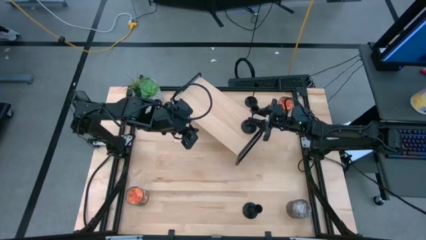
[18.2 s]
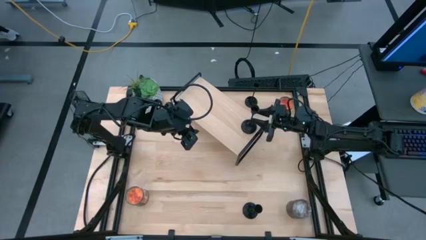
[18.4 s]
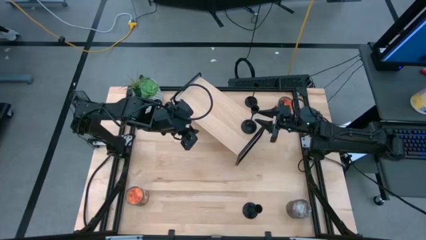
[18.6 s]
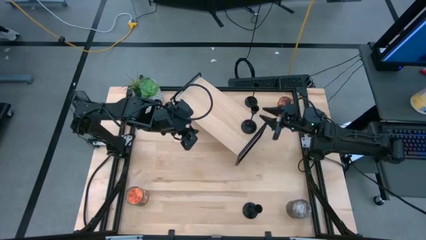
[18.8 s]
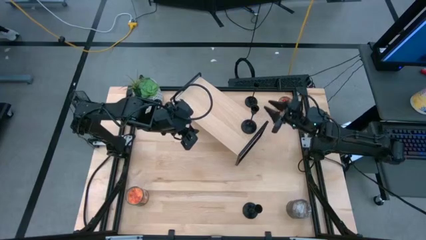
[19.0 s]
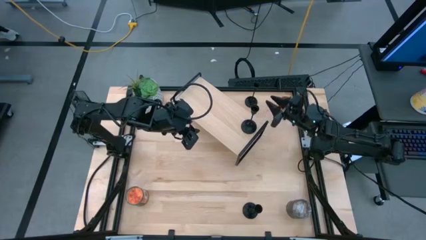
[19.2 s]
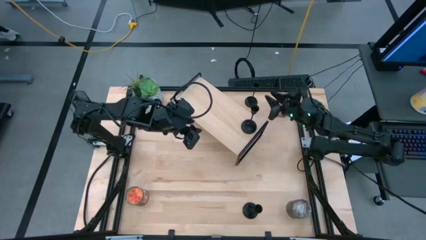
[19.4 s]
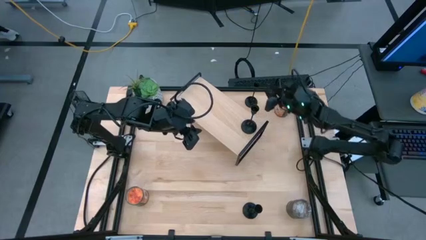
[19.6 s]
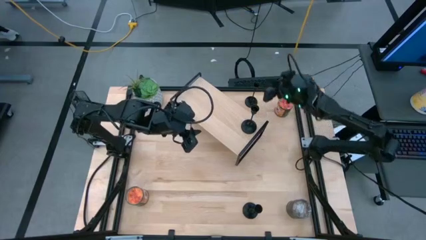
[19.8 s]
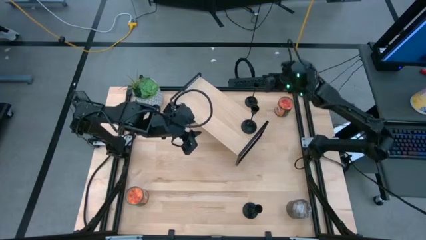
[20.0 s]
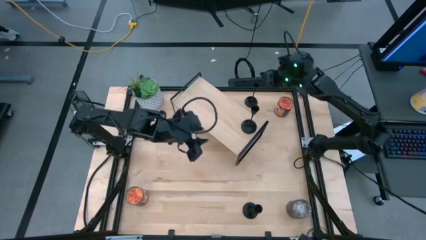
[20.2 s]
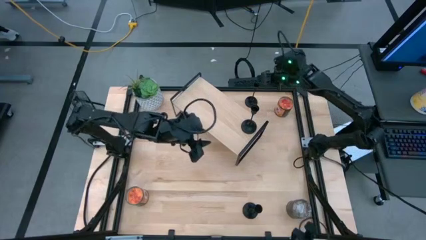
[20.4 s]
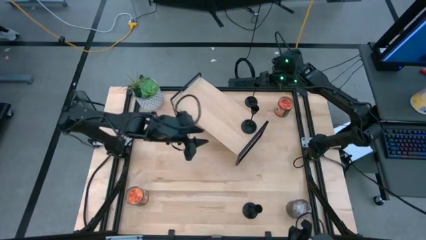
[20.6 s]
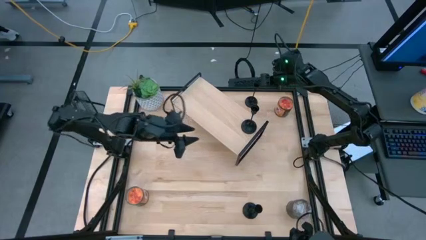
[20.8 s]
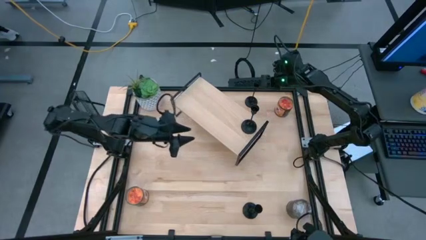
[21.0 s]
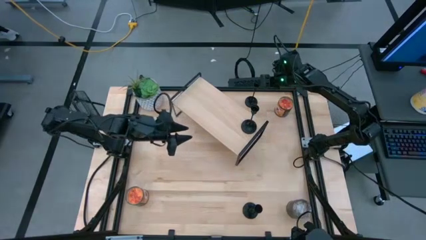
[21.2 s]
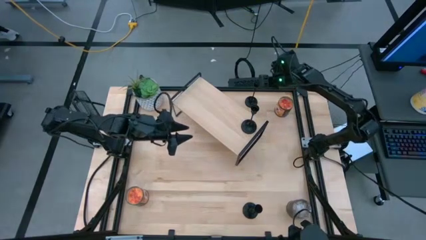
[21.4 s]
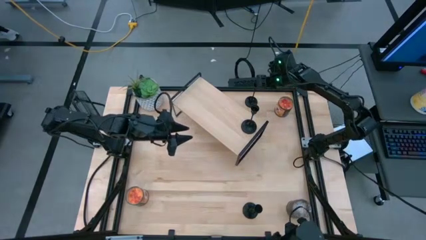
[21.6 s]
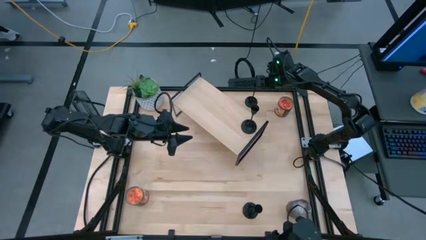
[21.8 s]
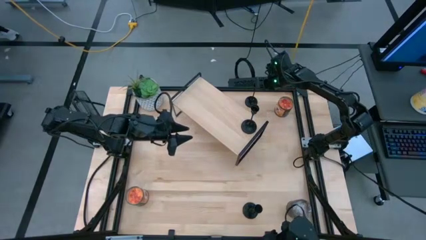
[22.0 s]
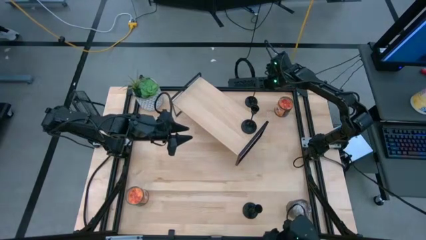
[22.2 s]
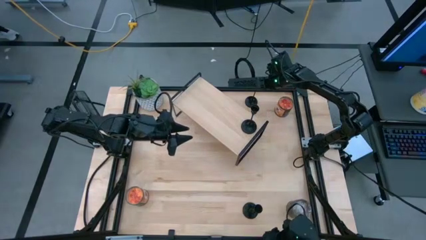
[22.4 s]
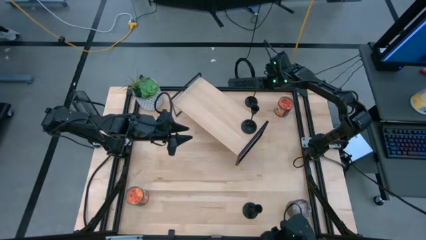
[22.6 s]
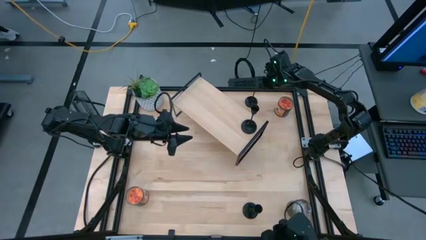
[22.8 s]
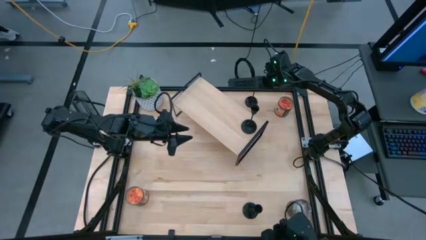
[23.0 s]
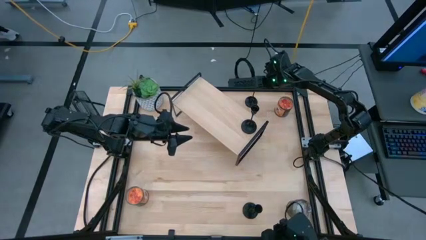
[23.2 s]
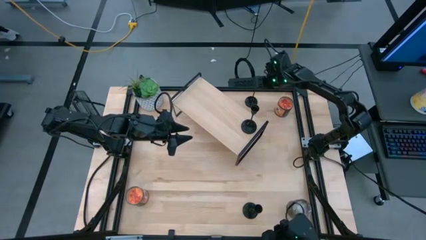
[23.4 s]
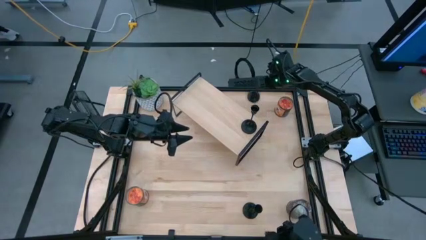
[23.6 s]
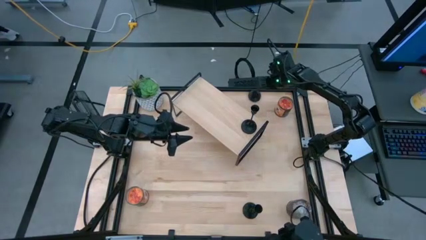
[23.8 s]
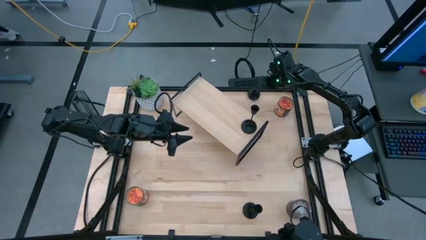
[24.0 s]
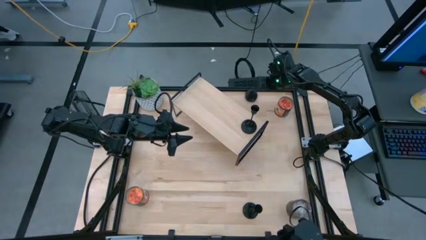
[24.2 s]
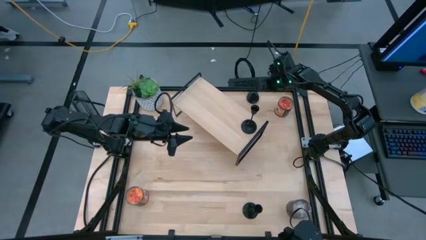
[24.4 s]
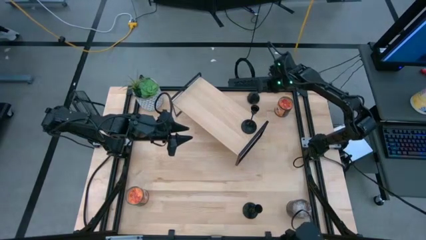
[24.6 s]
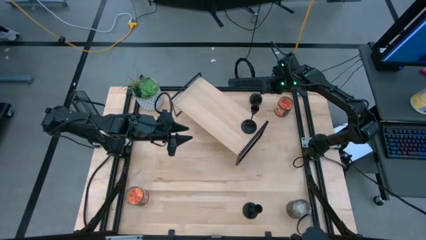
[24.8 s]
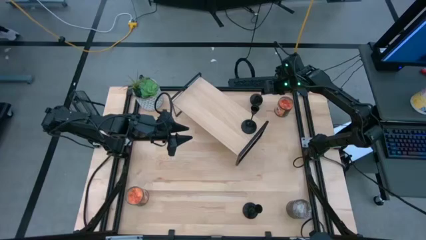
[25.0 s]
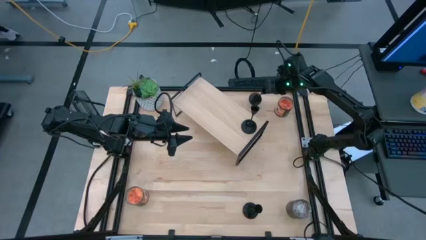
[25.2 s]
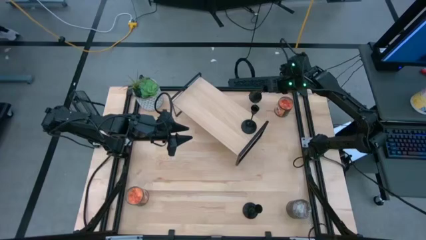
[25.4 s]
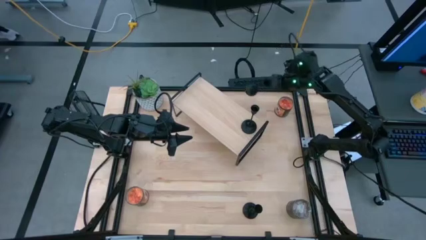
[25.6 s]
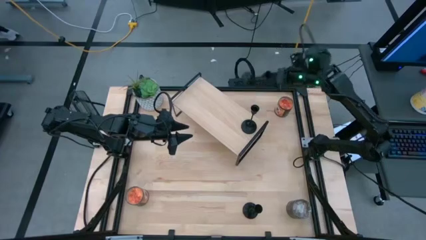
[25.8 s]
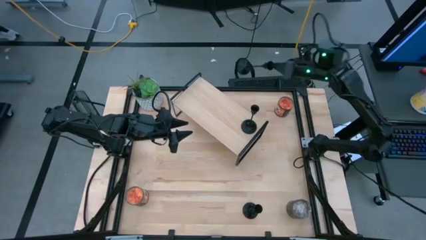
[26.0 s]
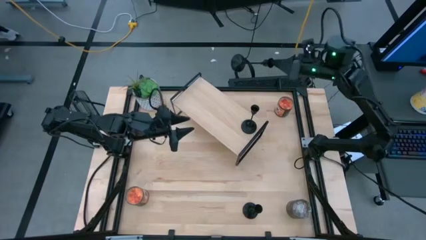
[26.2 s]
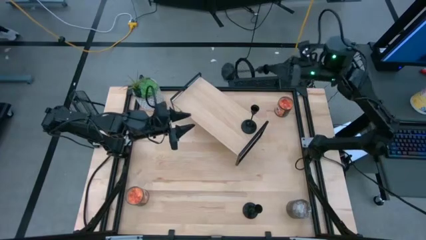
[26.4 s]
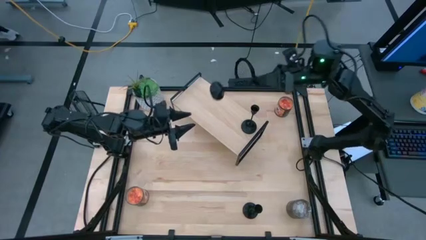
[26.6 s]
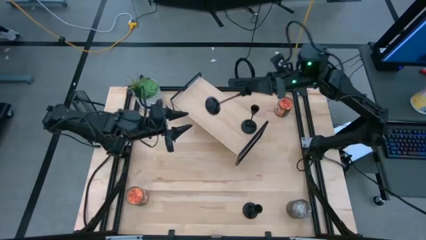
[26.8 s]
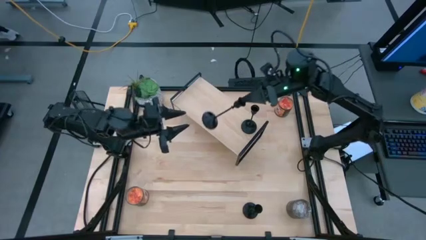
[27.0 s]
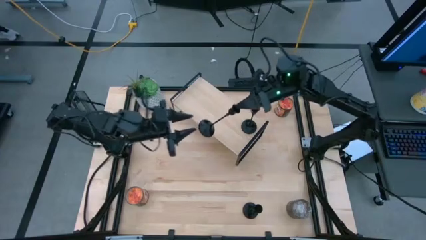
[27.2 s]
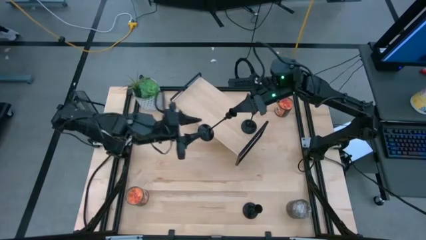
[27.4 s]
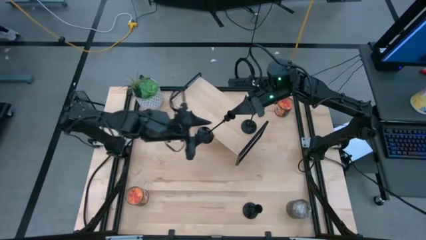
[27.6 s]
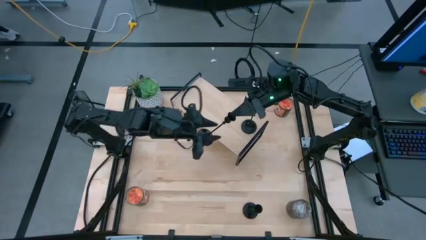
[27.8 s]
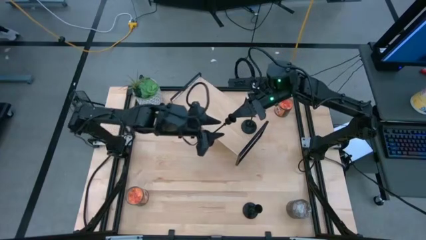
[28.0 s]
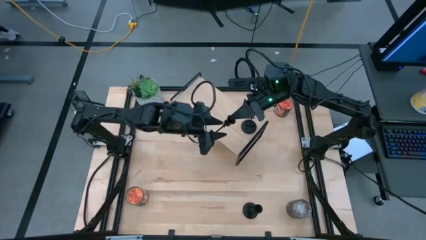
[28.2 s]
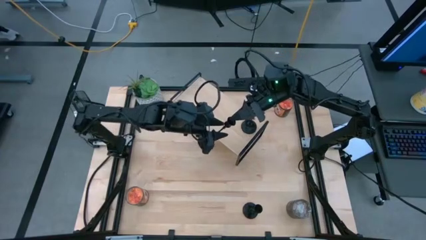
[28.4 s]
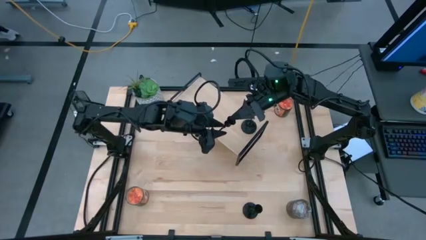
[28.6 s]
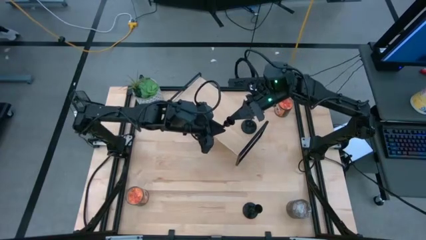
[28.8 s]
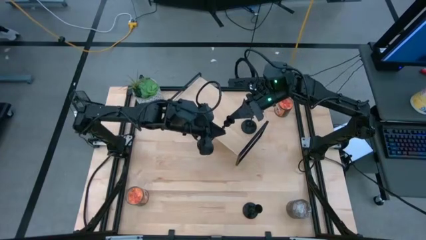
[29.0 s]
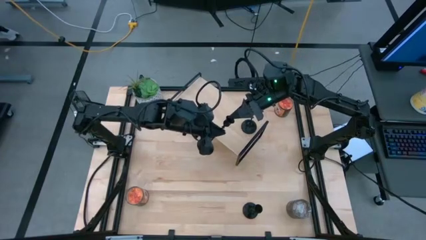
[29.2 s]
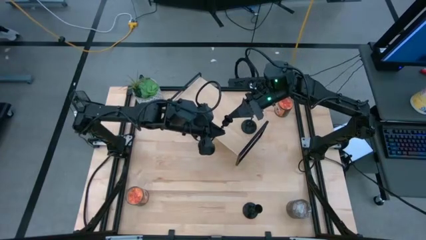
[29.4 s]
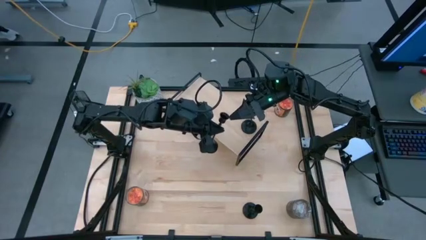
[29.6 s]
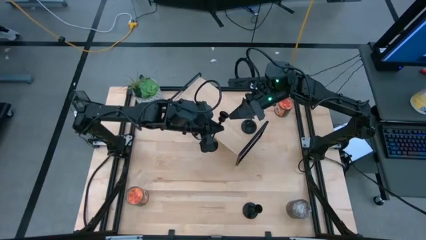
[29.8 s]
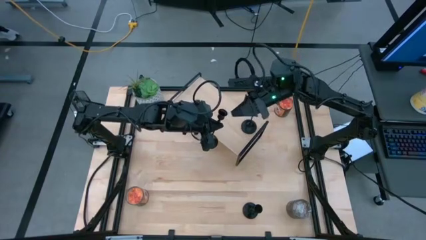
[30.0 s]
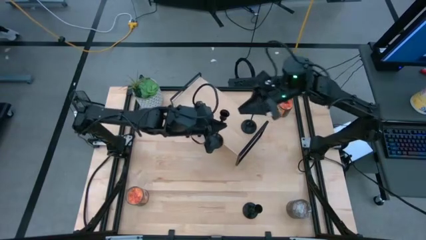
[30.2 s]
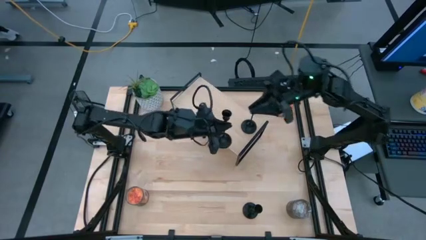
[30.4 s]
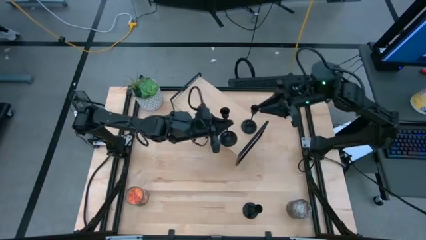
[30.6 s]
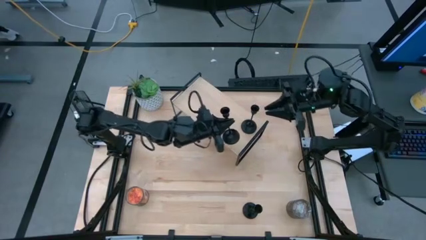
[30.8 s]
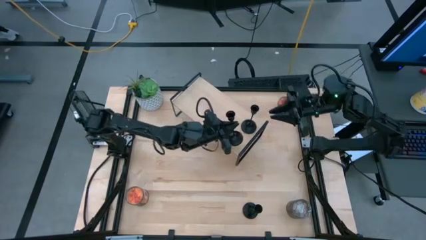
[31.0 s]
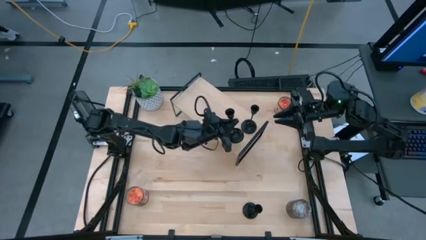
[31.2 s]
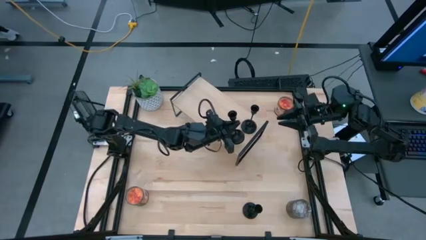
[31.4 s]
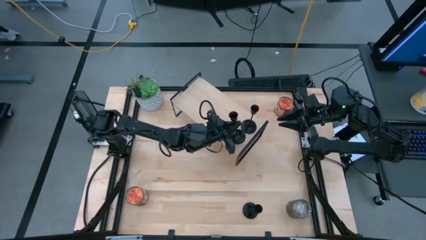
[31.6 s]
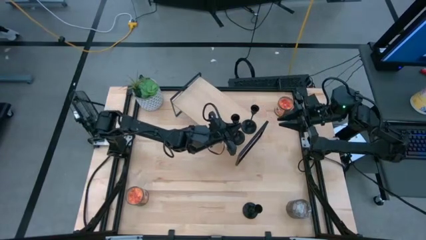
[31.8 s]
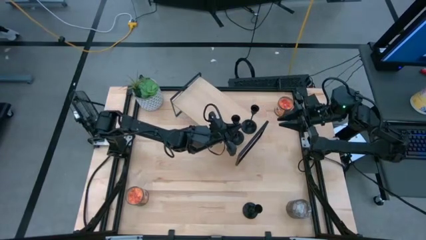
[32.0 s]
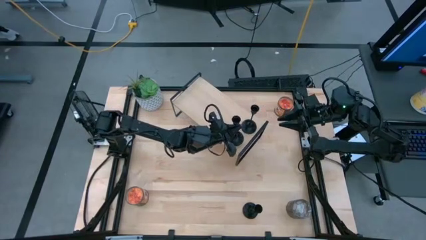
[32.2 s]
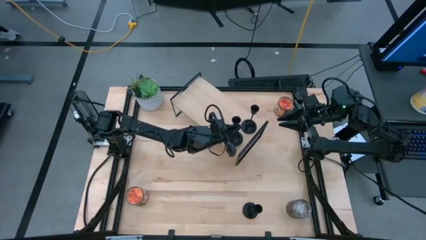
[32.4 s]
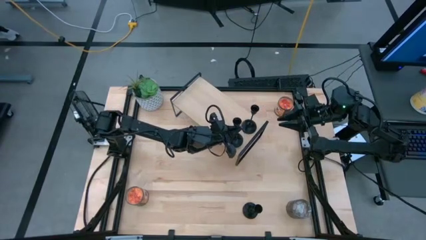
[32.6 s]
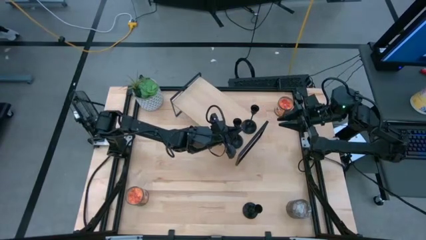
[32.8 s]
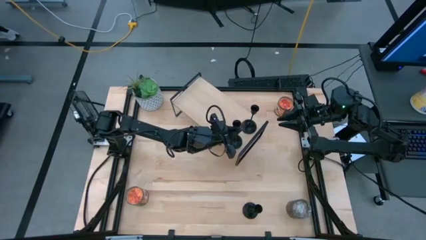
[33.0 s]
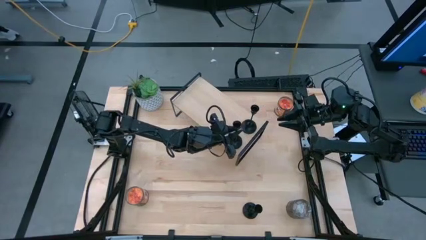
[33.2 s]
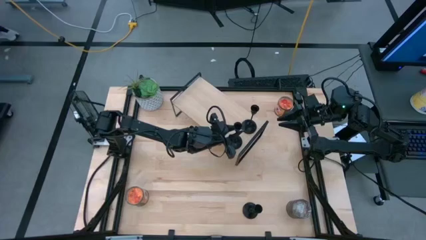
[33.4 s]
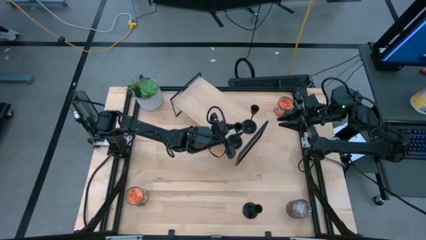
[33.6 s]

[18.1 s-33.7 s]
Task: Pick & Place candle stick holders
Put the top black candlestick on the shelf
